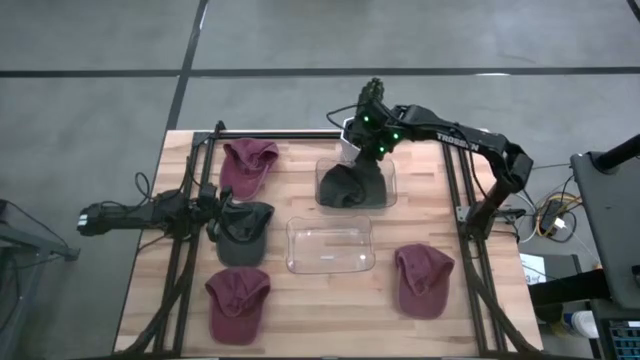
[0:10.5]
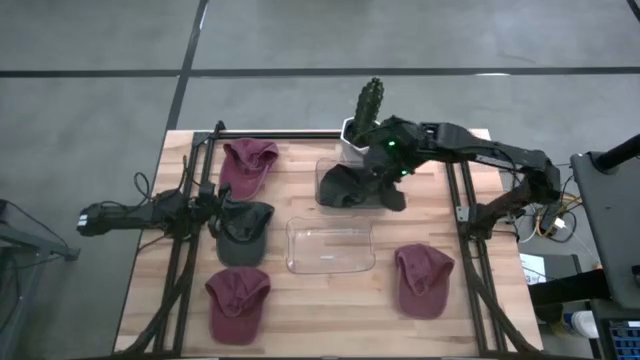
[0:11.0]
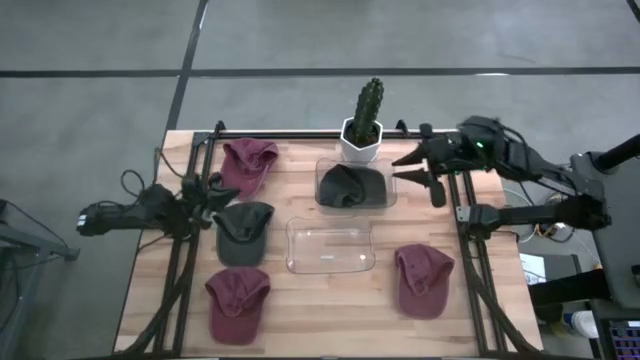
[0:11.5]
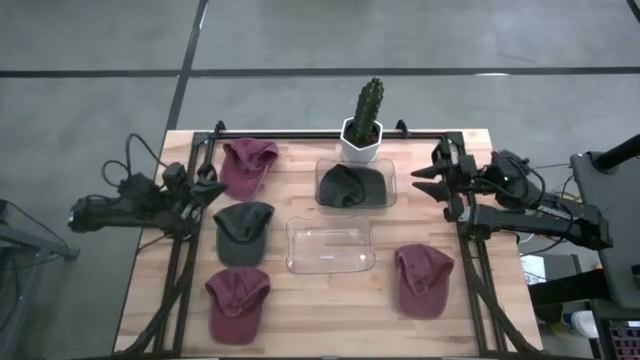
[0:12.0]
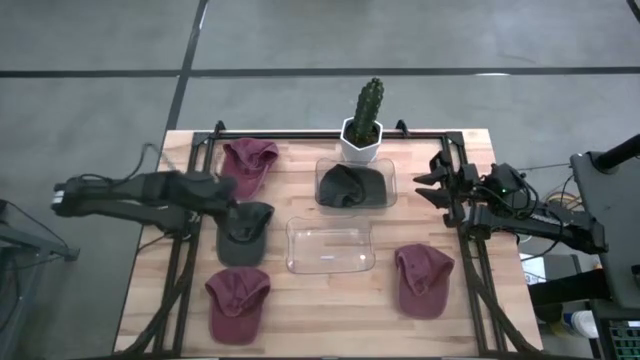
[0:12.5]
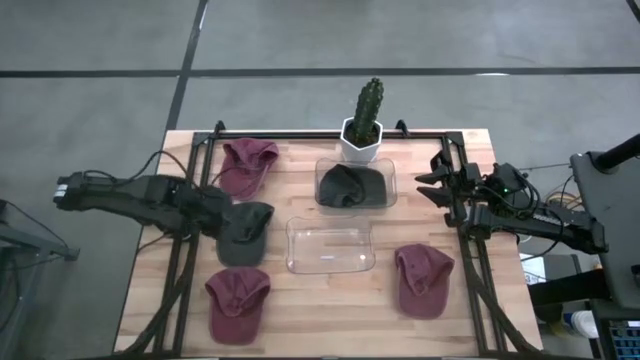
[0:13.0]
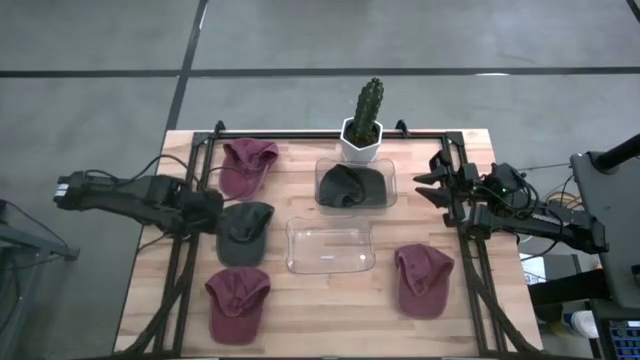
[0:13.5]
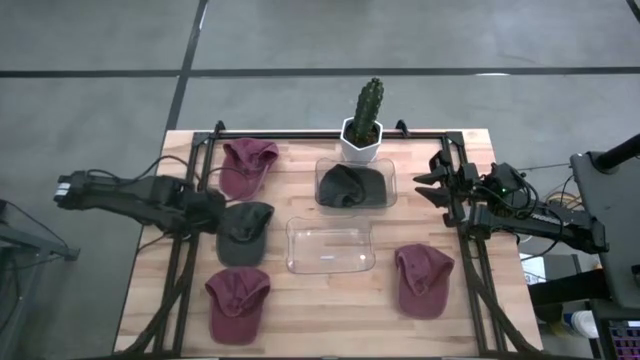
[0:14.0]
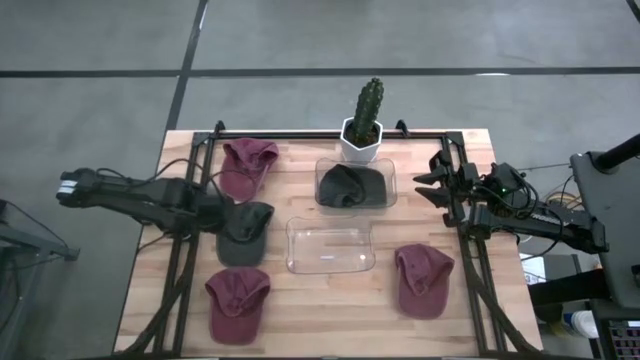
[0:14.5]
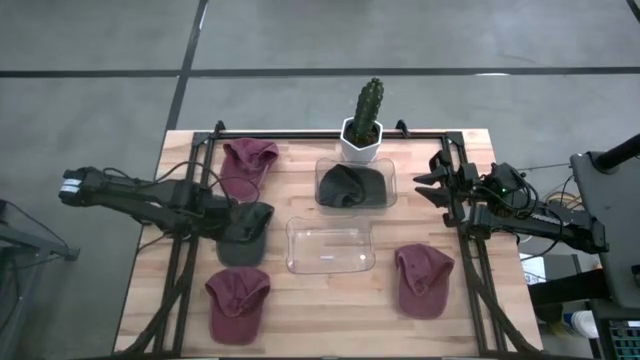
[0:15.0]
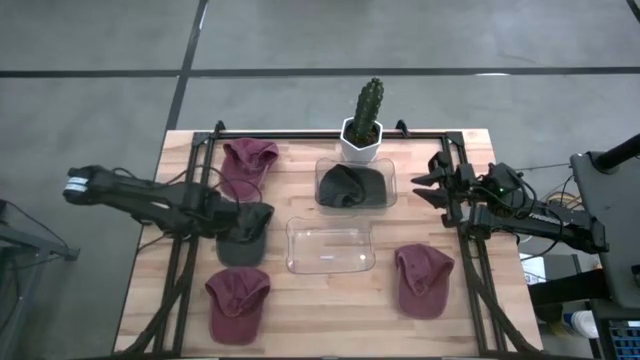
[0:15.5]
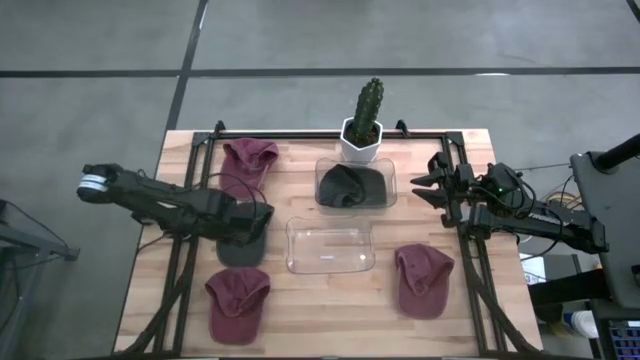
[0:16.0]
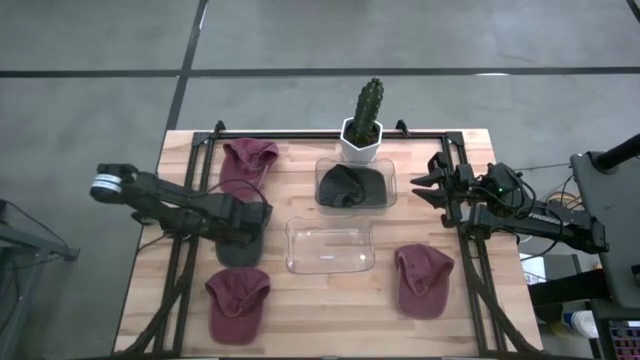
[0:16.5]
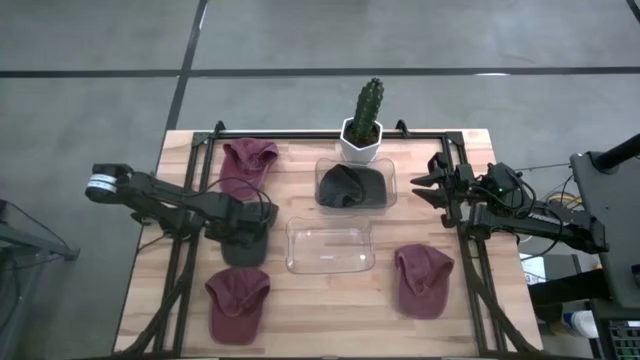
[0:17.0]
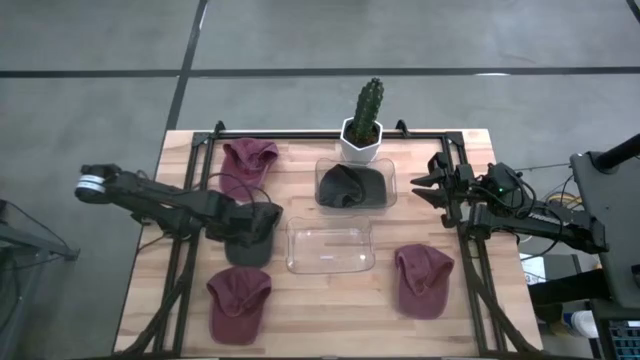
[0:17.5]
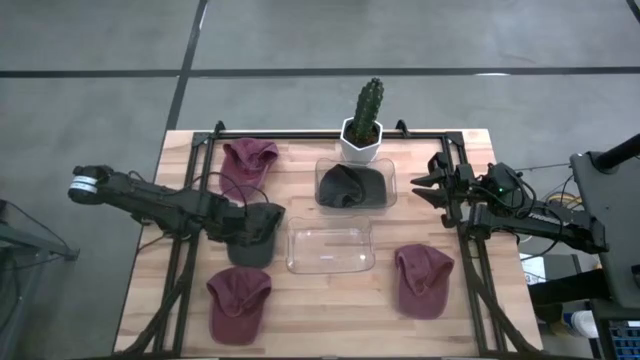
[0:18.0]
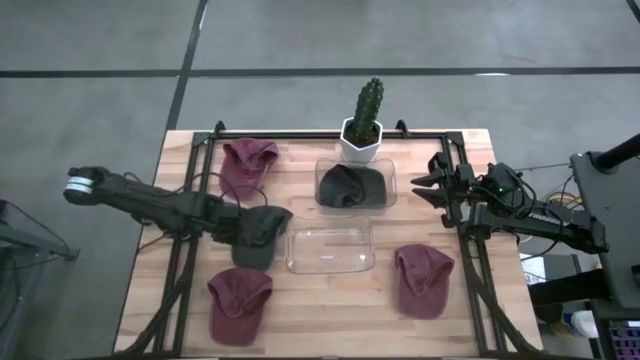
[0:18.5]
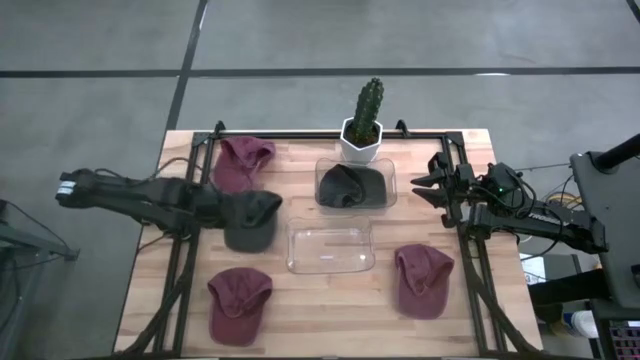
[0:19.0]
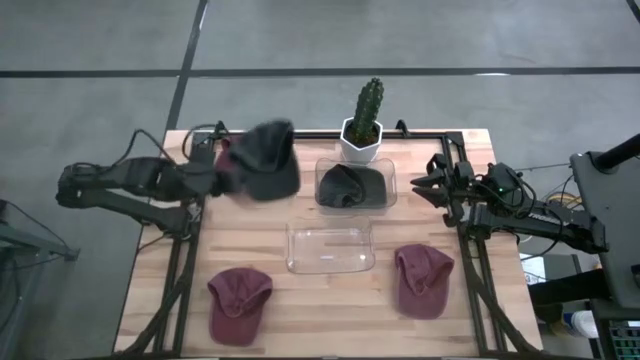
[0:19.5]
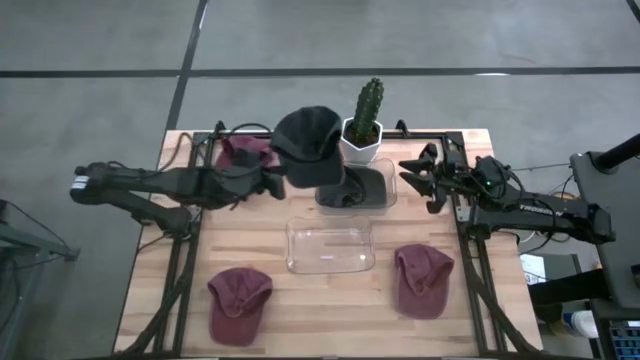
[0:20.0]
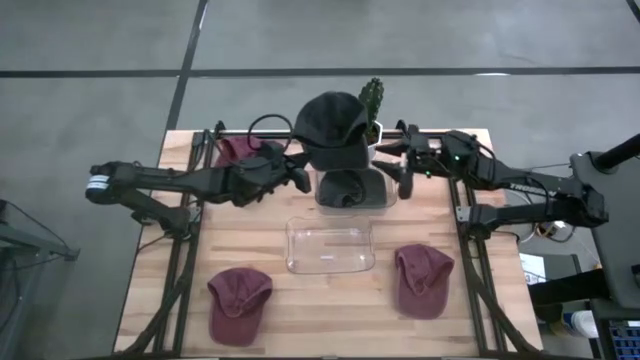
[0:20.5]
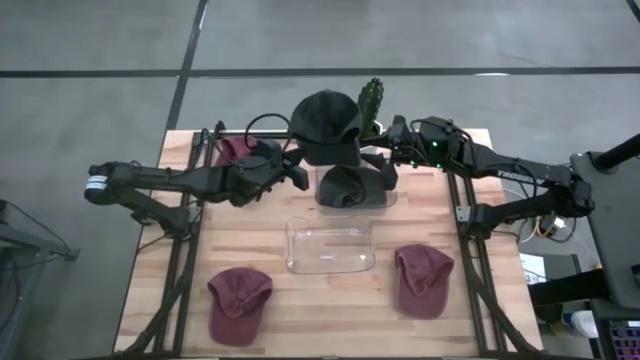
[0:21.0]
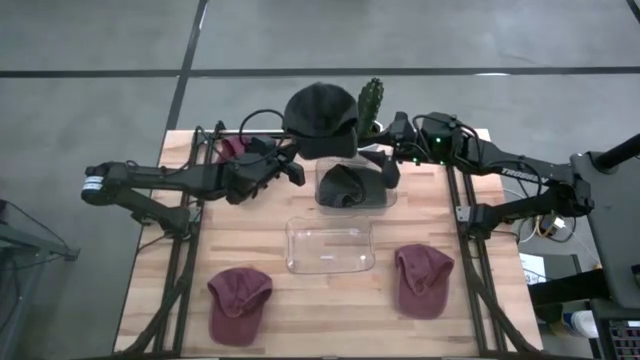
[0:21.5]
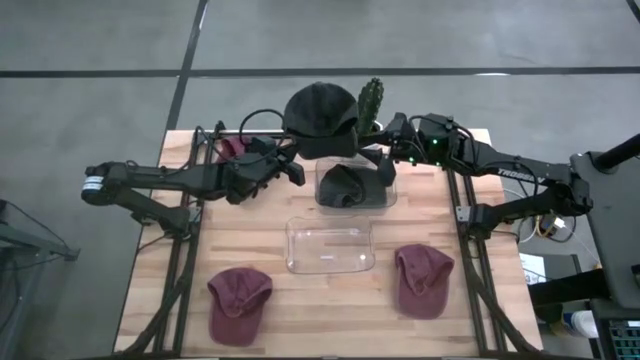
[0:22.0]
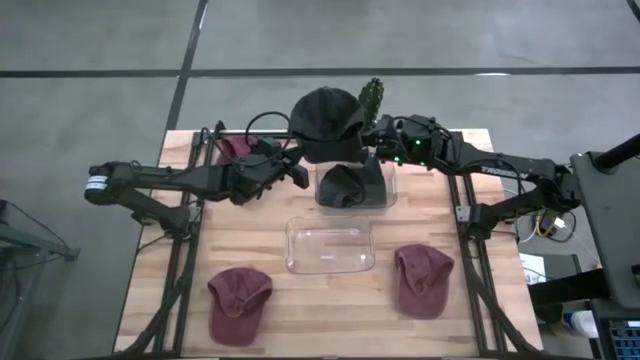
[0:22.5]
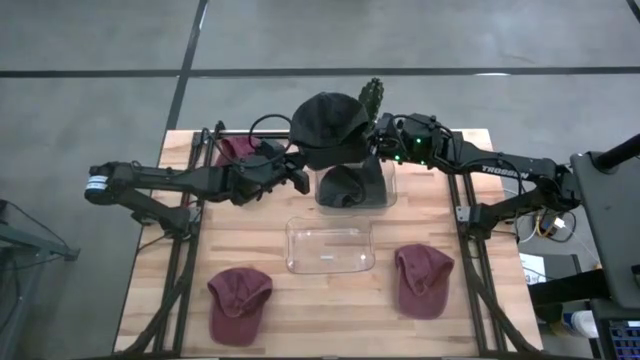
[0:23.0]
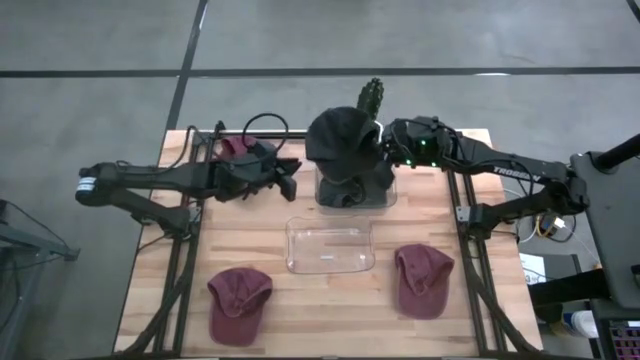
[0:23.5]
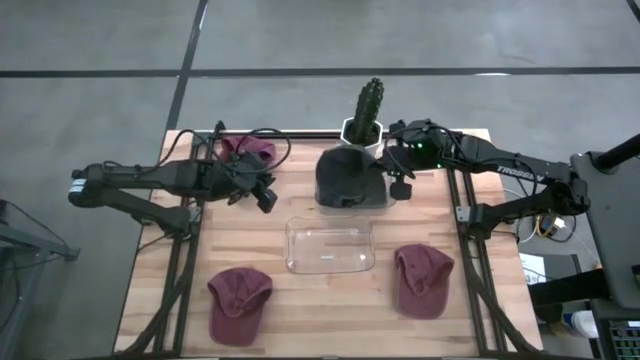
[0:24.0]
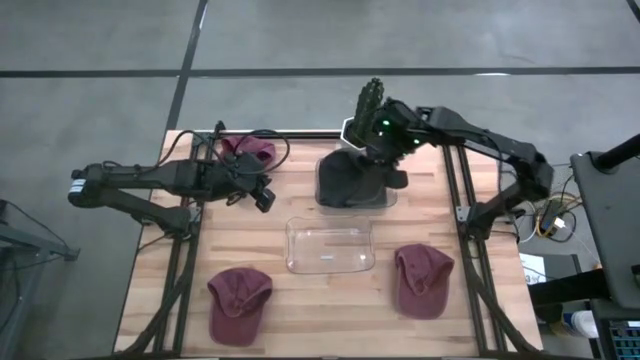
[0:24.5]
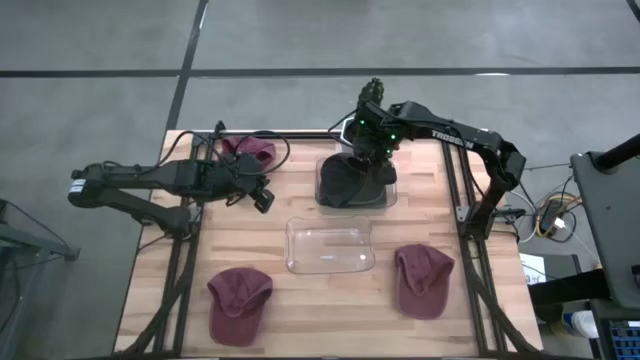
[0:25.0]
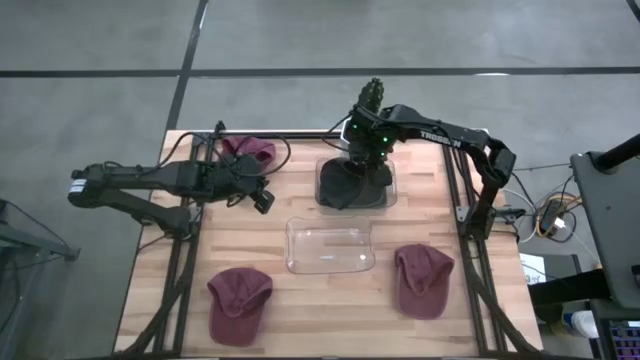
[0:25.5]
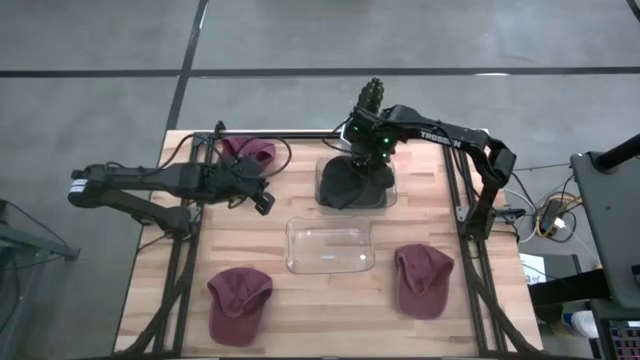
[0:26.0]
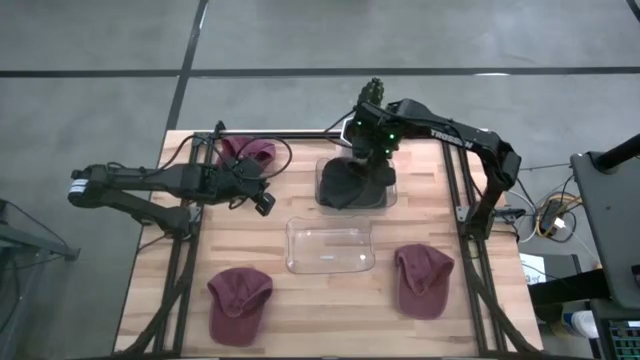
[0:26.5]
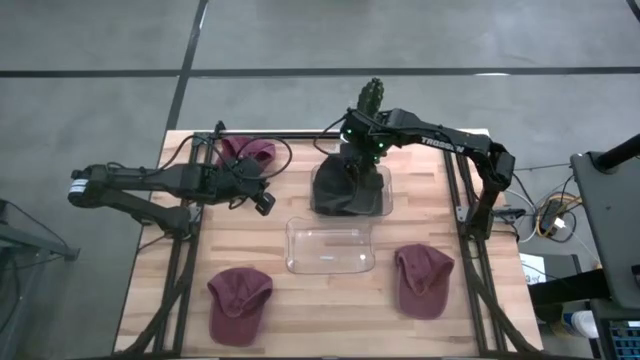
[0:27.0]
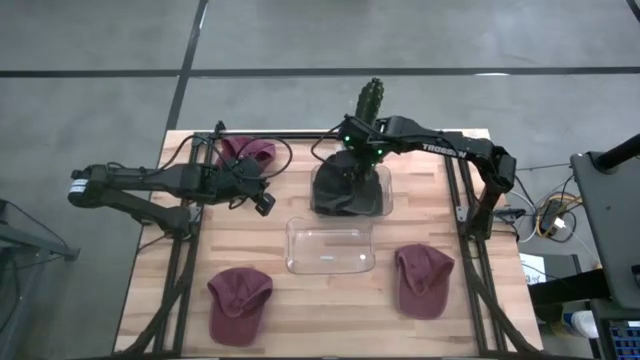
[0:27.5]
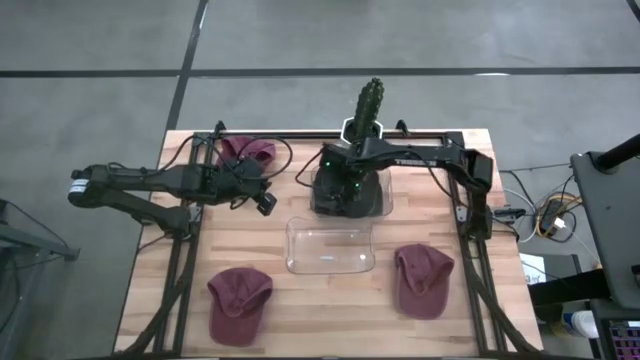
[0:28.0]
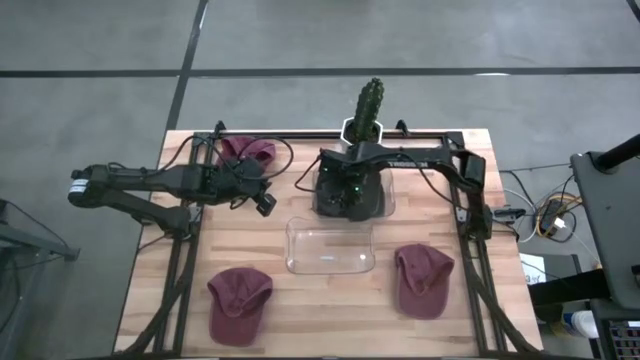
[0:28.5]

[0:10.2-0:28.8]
Task: Pick & Place hat
Put the black cap into the top transparent bin
